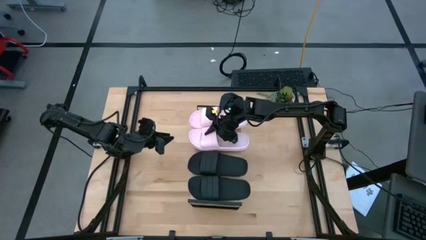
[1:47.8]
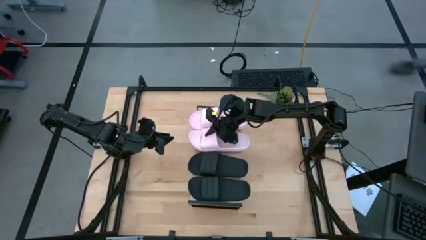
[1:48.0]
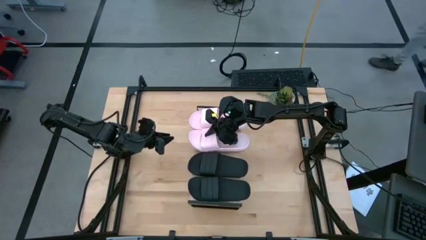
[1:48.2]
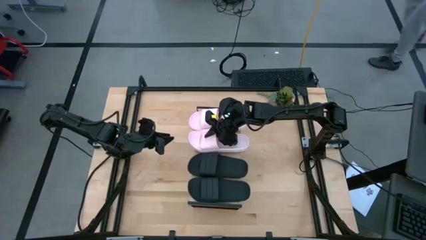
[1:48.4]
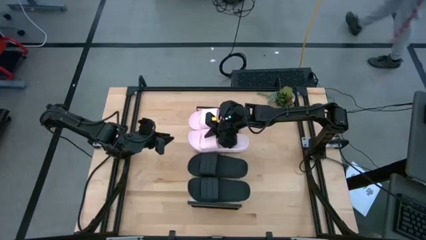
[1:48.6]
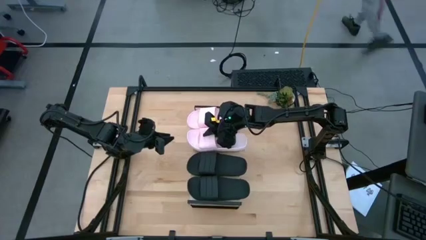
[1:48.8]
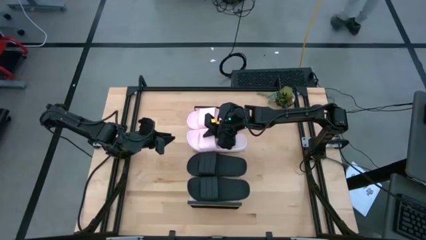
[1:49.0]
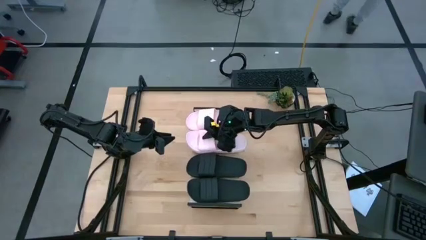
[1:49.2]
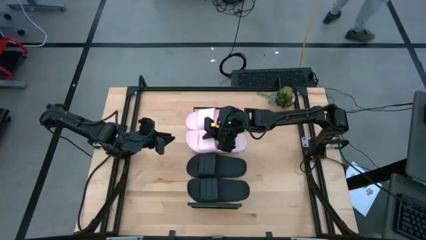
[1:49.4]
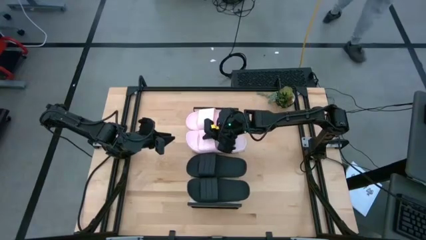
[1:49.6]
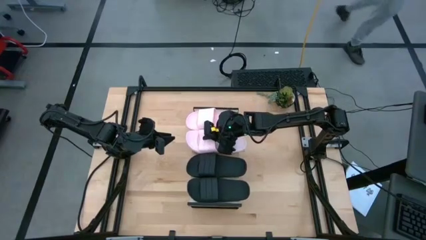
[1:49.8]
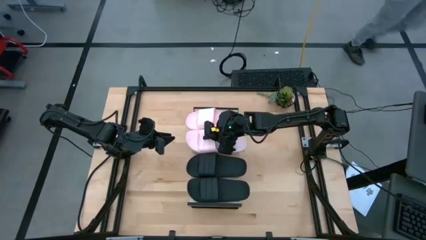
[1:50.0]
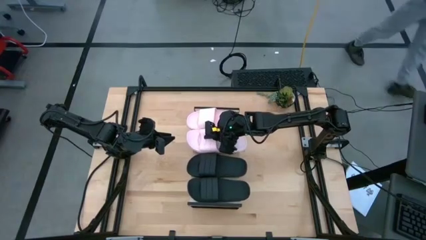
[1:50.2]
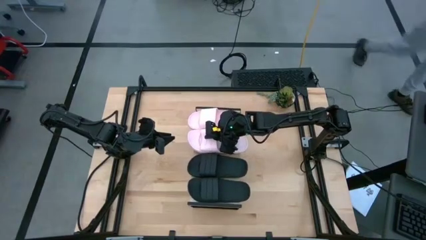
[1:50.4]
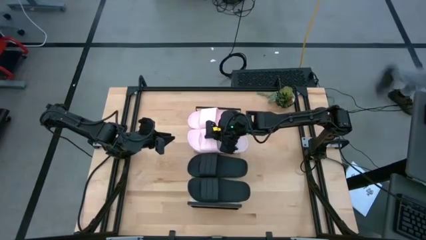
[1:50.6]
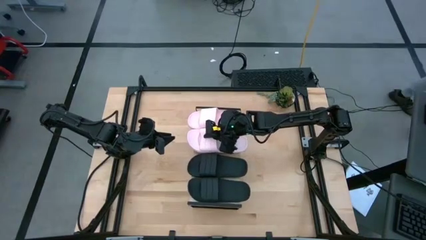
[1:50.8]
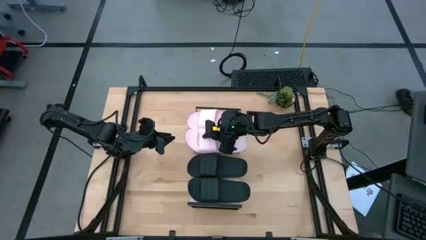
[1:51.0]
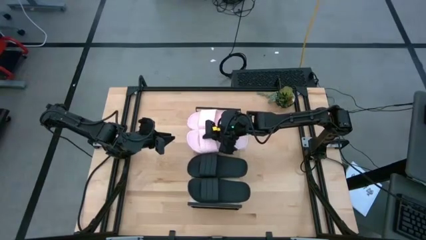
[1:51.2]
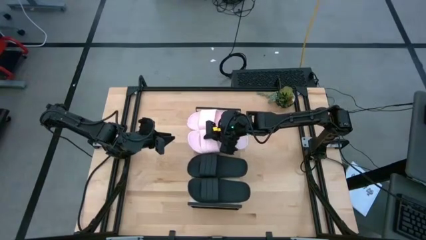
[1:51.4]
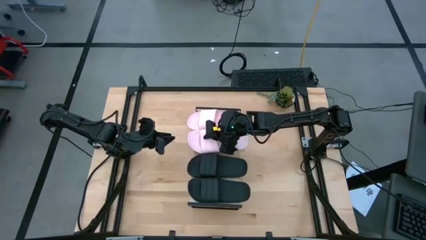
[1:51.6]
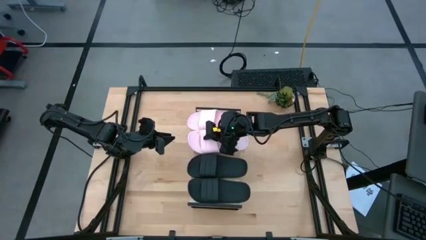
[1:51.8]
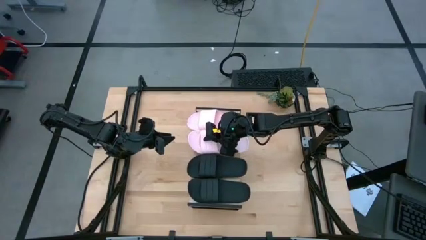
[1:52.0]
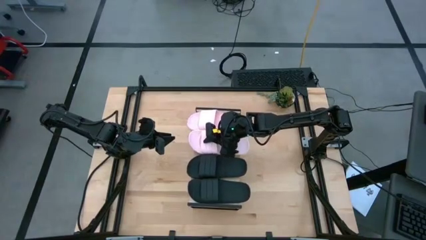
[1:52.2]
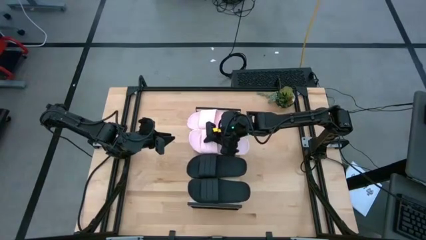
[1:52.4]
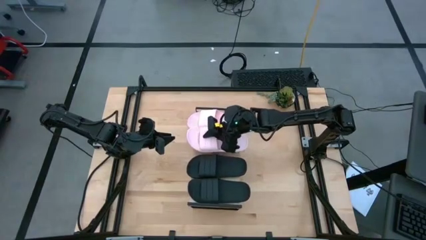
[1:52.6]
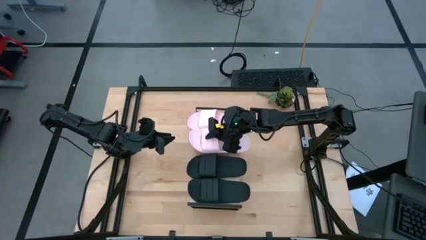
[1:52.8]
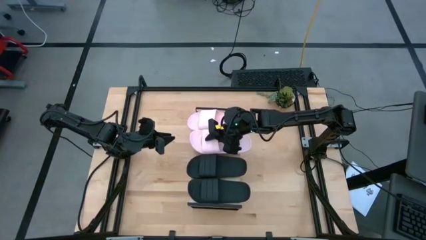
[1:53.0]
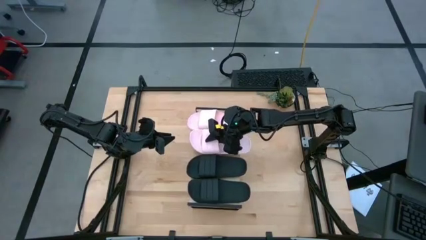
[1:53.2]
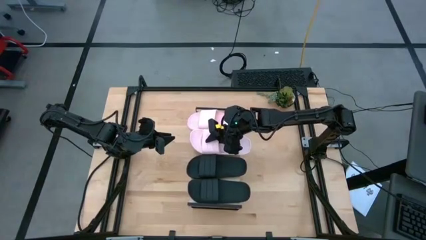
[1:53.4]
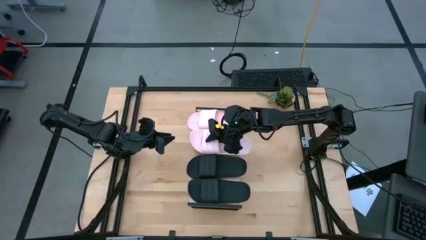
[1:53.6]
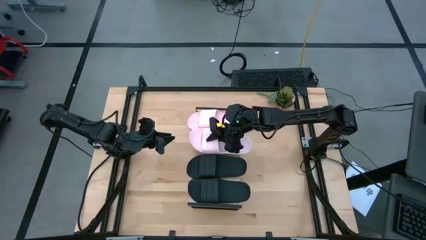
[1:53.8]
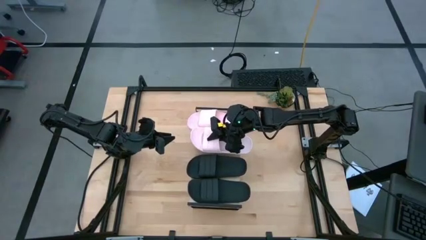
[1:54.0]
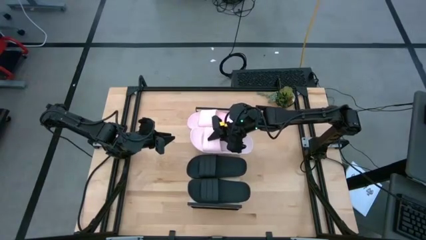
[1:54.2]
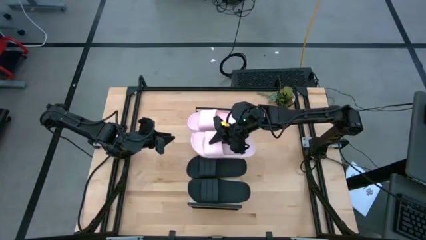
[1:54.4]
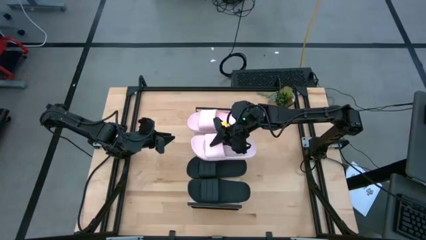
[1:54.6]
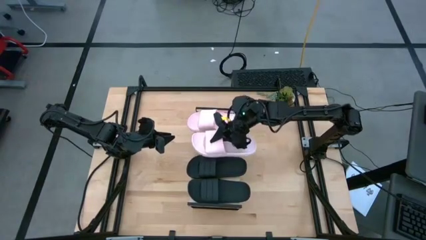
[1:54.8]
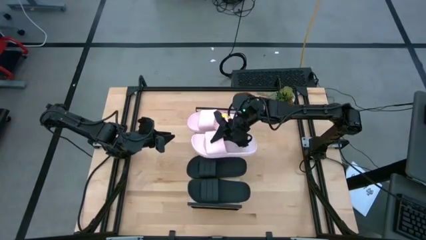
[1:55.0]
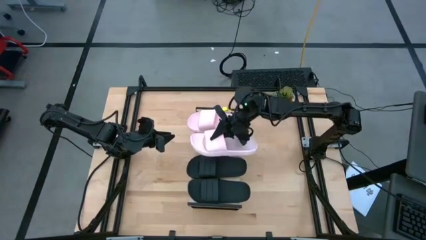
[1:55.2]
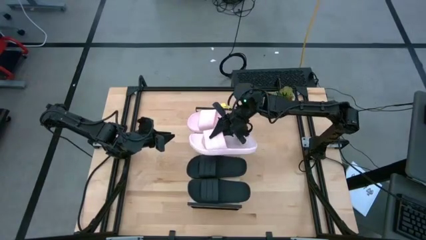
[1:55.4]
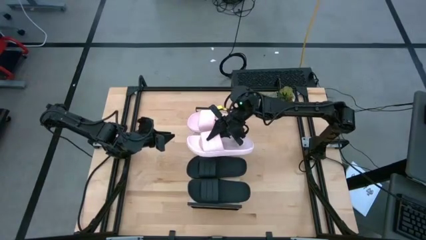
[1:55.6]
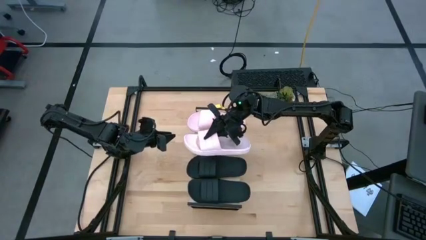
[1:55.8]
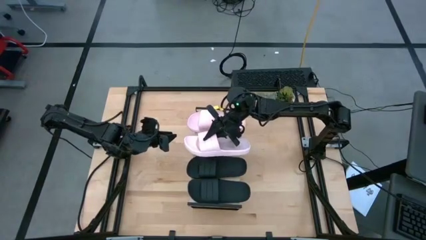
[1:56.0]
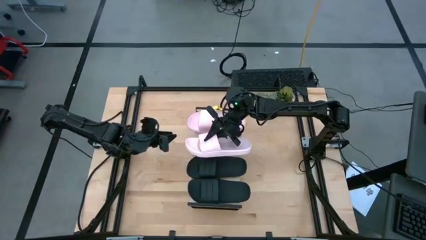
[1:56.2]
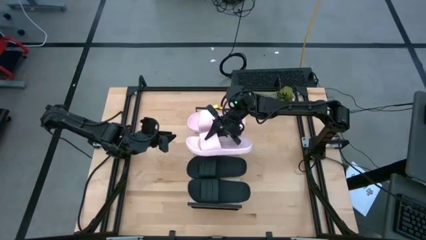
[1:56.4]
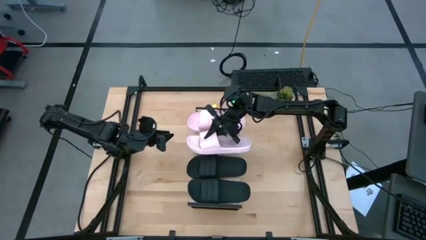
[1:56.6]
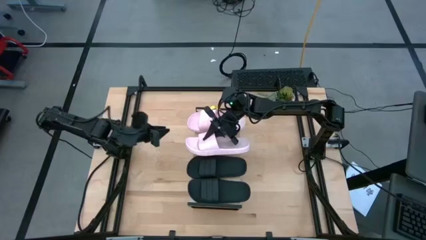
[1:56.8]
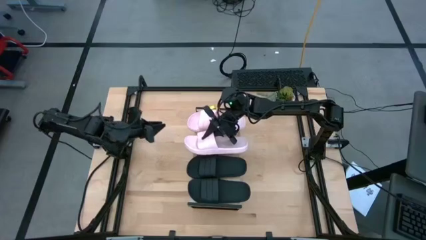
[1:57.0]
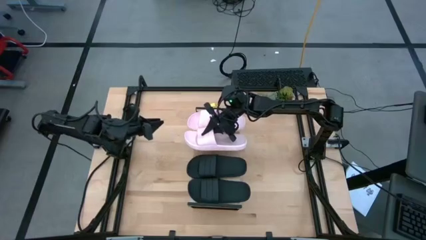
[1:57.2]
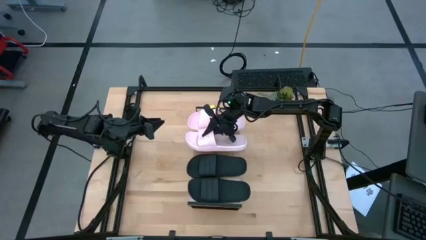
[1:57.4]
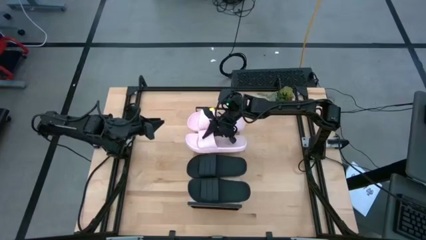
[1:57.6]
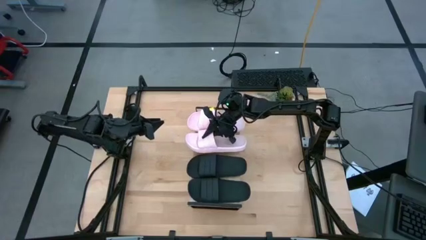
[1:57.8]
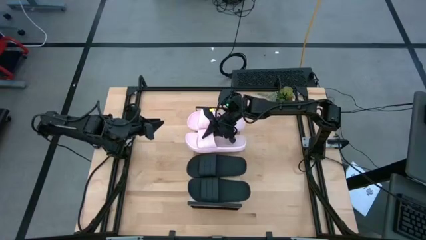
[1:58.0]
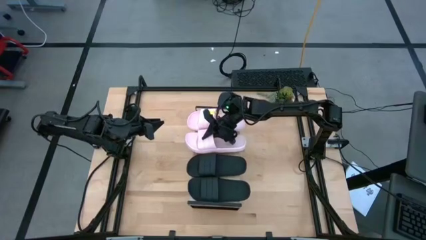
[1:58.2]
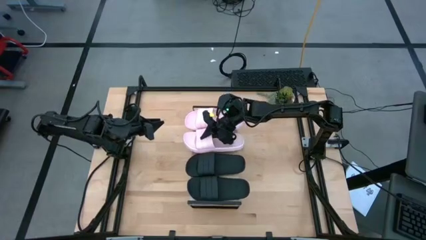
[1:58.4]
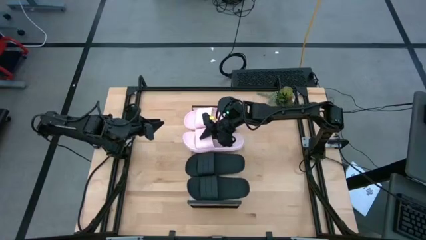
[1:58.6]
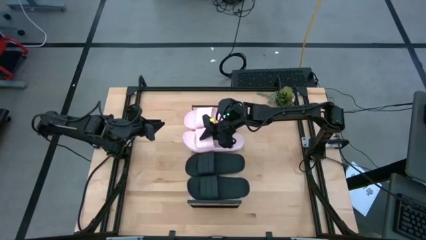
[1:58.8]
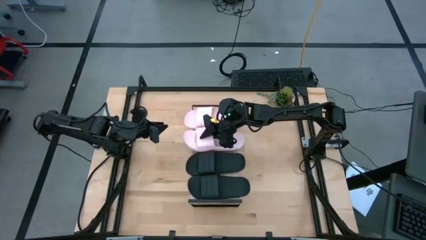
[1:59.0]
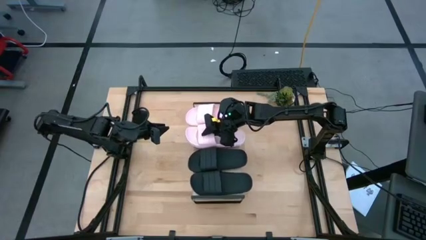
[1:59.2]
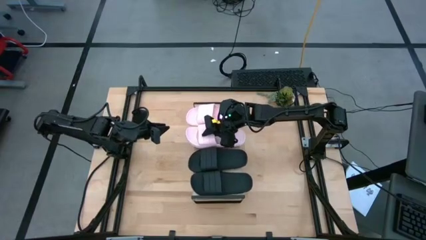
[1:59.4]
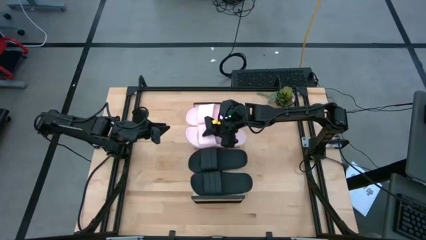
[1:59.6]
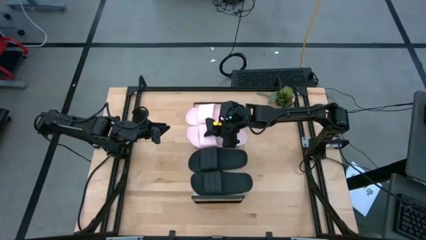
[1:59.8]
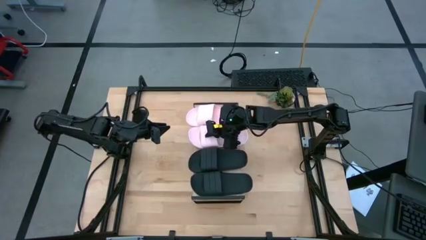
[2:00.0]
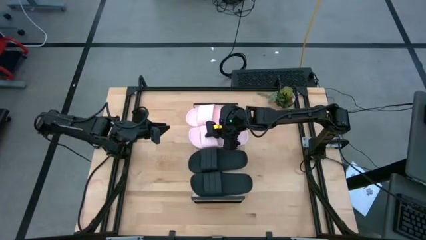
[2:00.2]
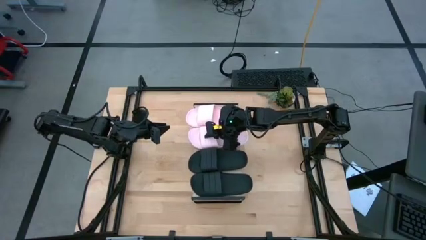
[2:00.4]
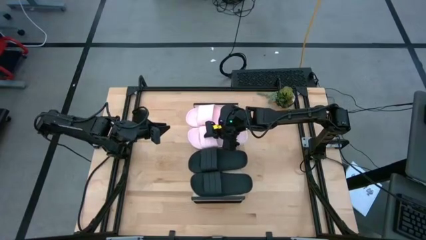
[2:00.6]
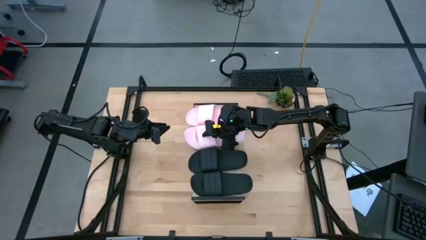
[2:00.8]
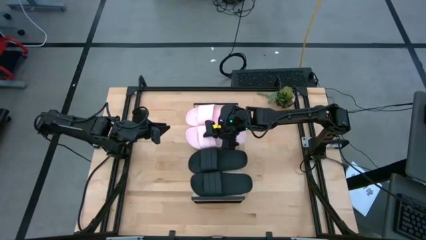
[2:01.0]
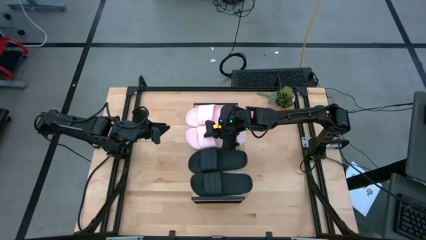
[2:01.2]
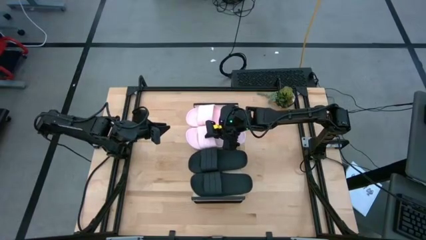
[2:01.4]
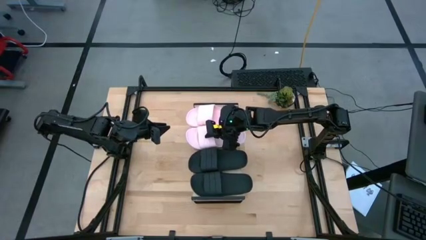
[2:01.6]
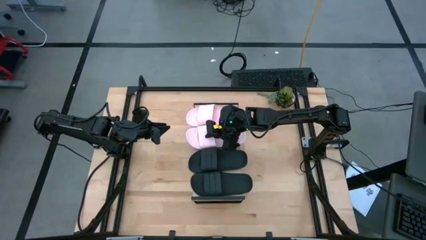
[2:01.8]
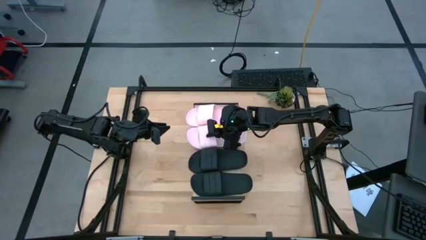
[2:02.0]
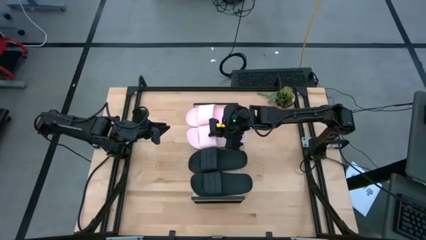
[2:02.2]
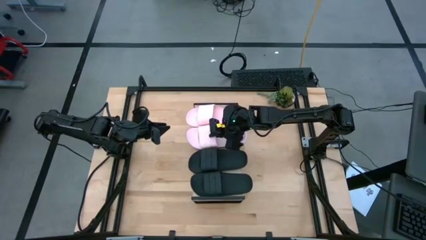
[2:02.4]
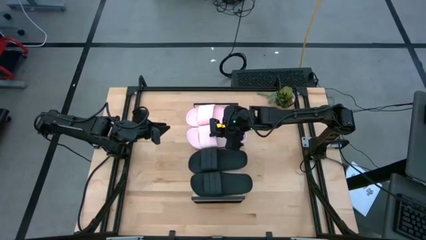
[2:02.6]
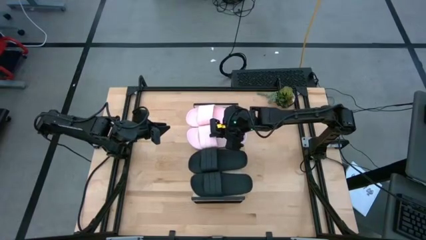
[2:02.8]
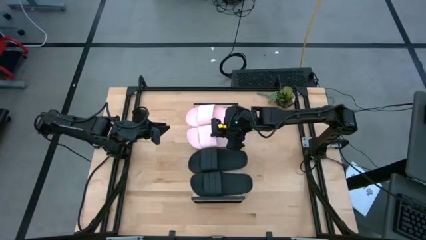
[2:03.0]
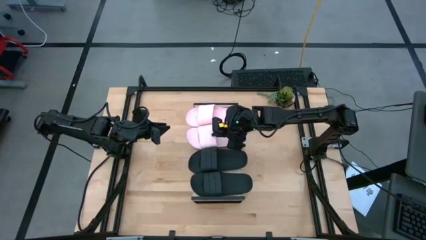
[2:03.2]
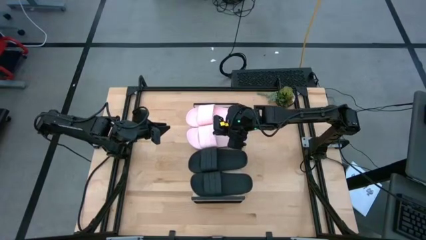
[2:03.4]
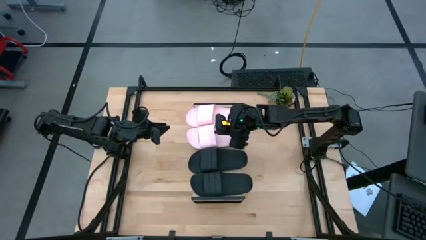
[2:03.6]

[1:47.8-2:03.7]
Task: Pick and place slides into the shelf
Put the pink slipper on the shelf
